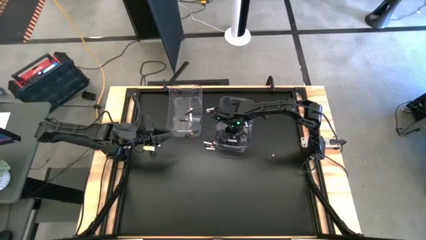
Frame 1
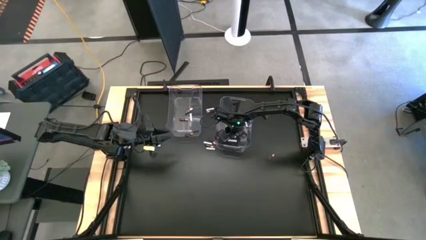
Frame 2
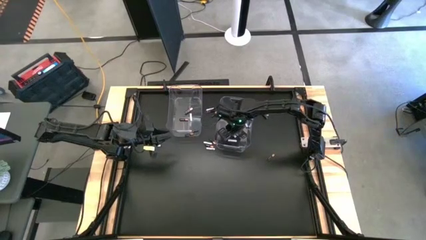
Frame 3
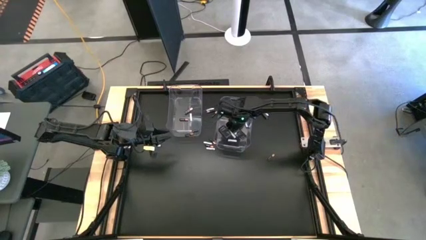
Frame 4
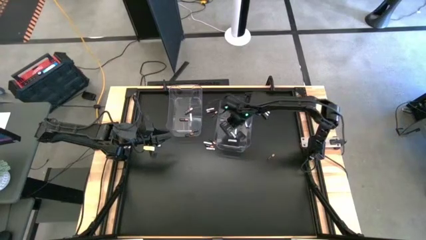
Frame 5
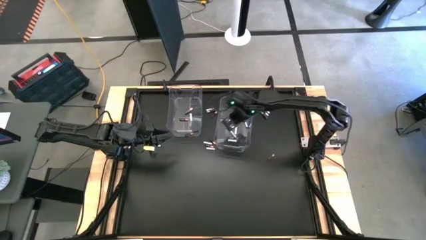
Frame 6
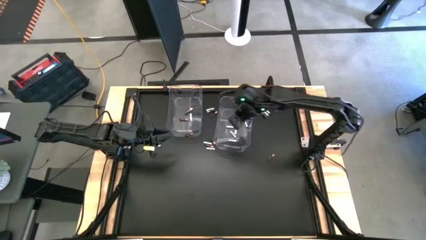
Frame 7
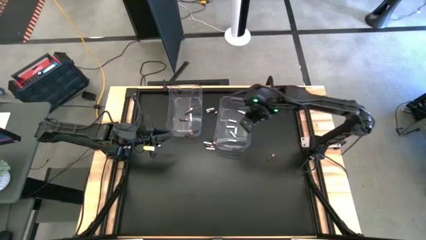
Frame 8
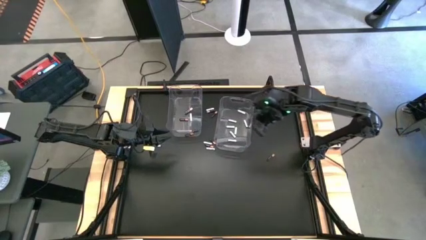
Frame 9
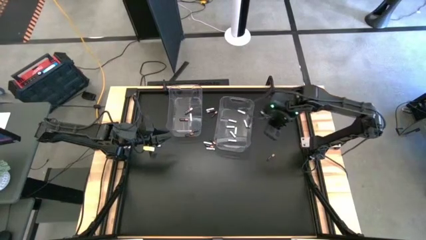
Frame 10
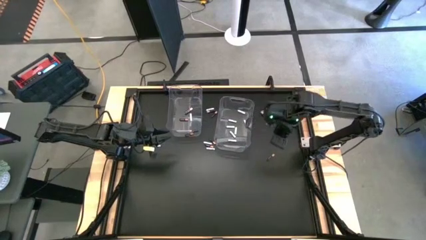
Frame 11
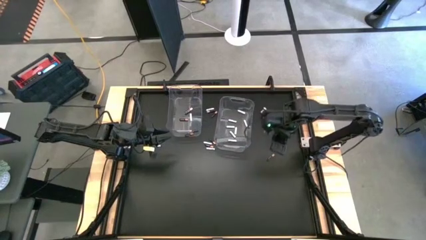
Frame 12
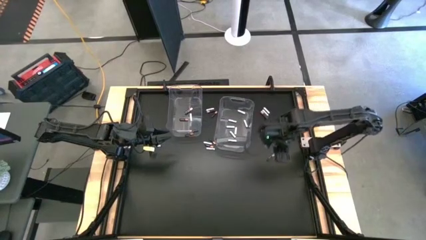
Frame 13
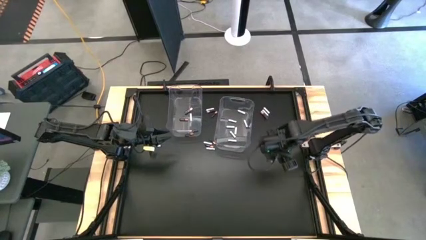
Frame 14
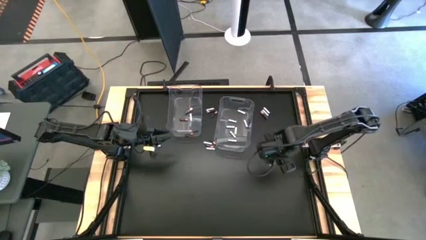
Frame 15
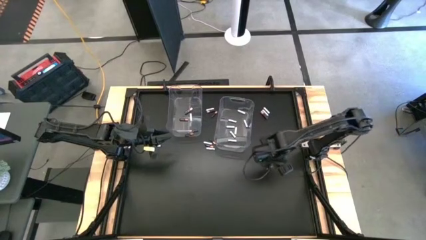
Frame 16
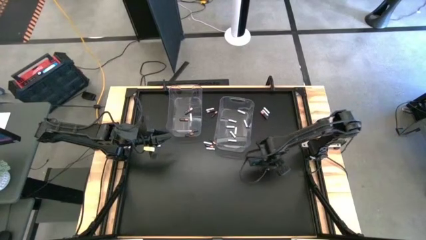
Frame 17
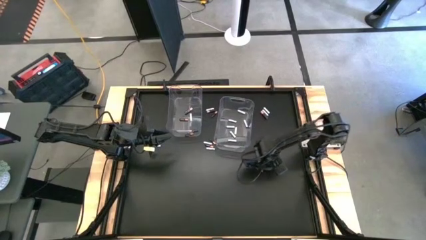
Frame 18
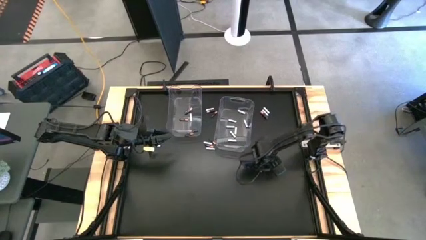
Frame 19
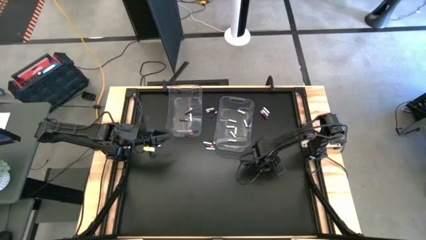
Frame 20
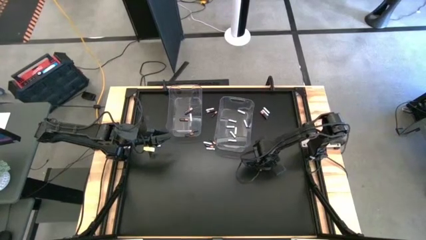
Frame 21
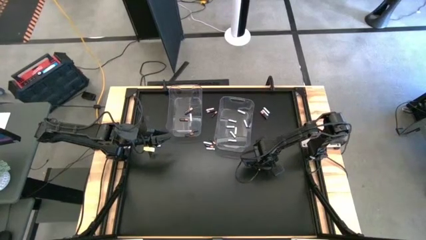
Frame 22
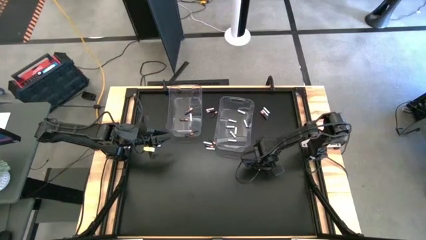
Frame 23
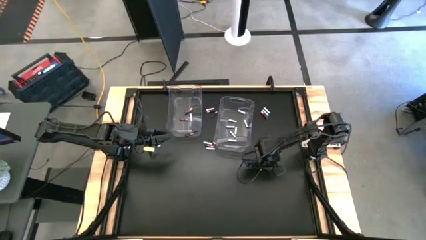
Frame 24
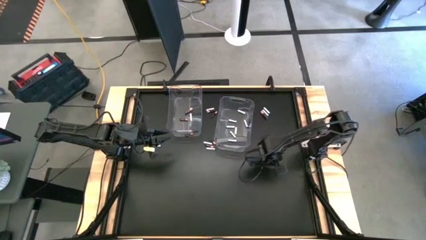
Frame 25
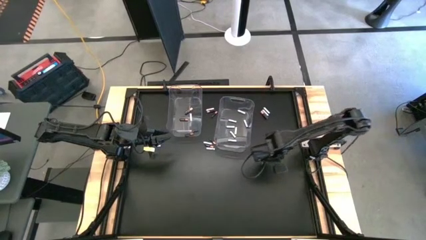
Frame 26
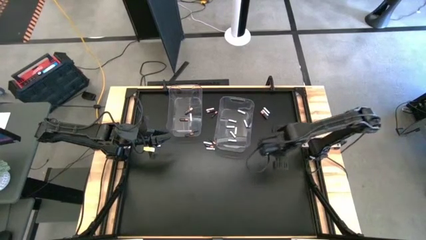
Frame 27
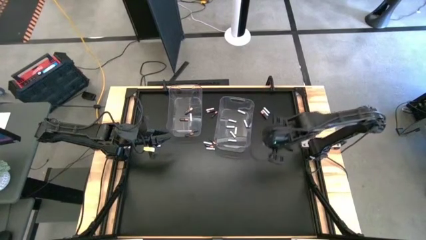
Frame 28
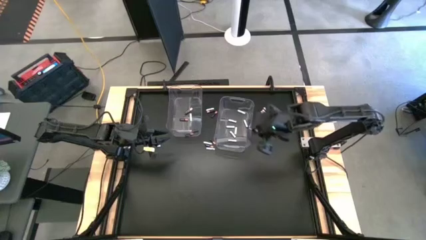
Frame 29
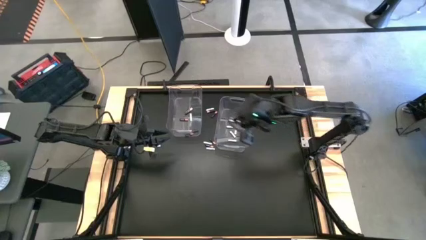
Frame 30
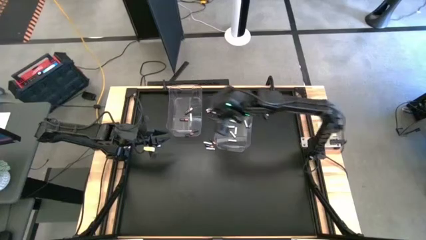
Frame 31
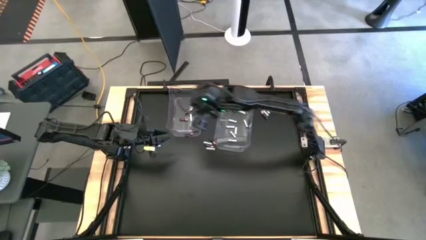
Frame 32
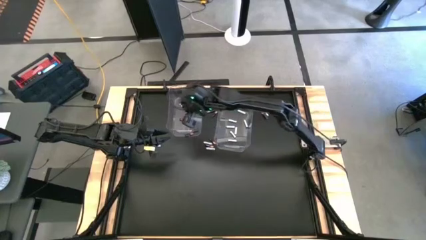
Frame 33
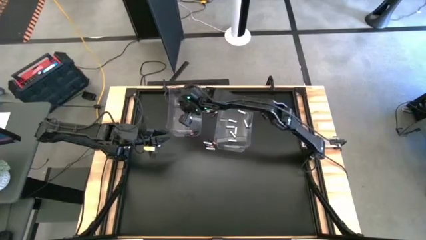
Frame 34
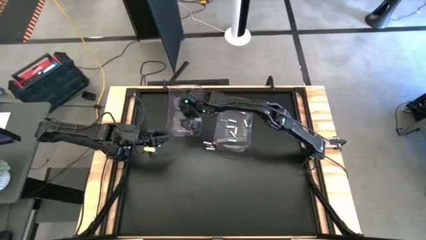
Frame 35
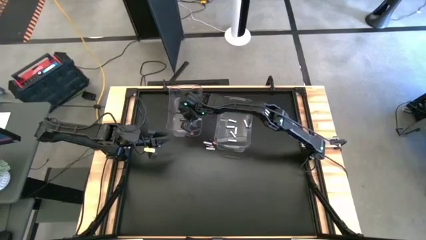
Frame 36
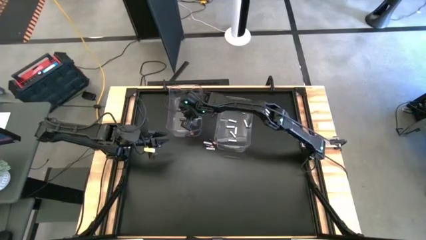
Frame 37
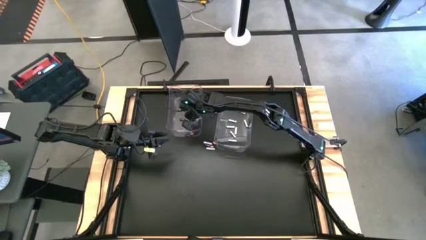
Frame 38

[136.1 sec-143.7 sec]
Task: Sort batteries
Put the black battery into the left transparent bin

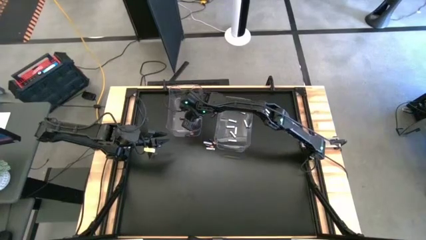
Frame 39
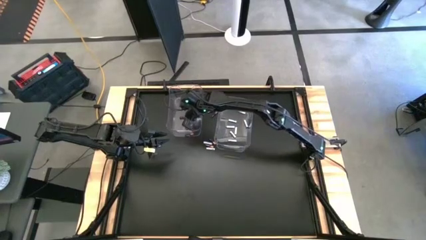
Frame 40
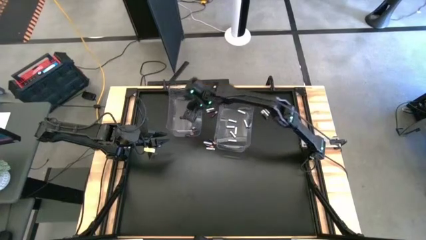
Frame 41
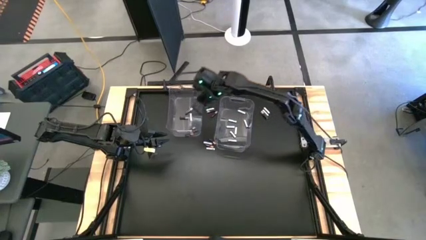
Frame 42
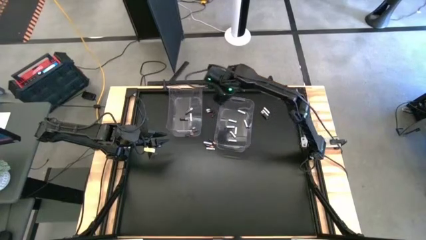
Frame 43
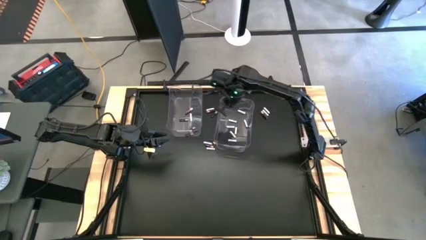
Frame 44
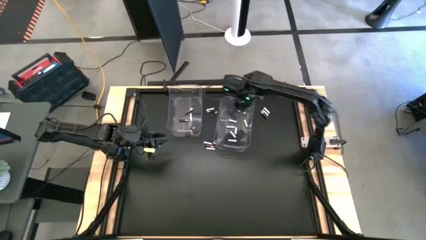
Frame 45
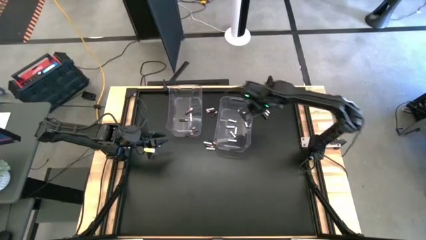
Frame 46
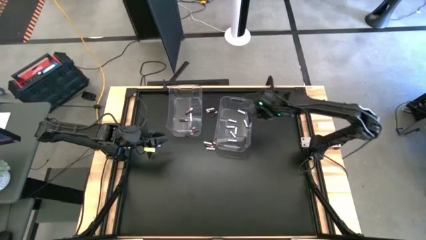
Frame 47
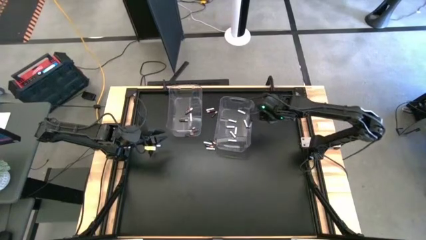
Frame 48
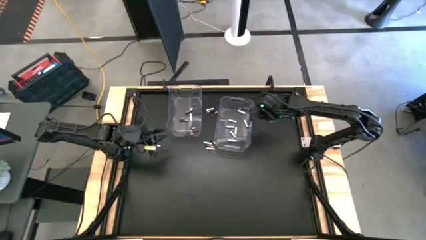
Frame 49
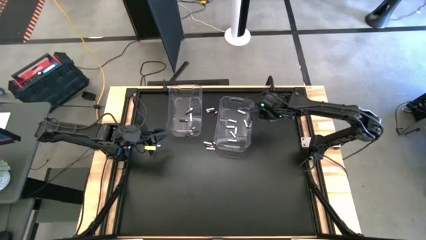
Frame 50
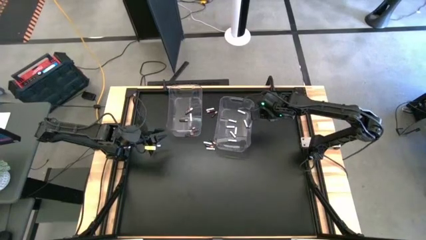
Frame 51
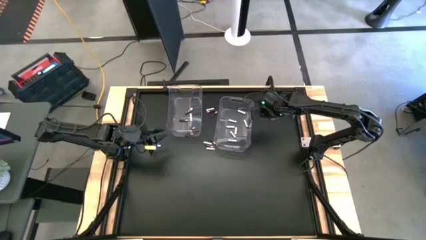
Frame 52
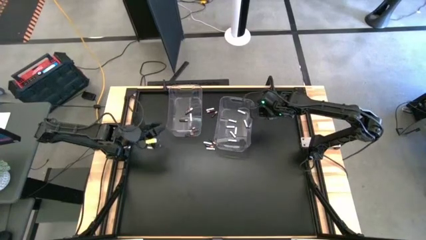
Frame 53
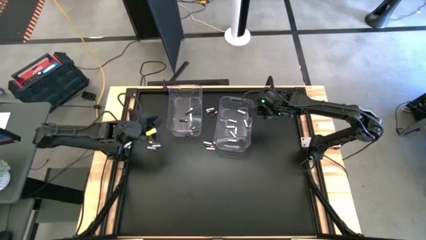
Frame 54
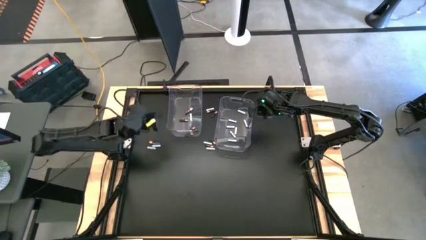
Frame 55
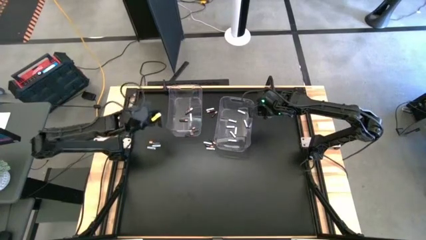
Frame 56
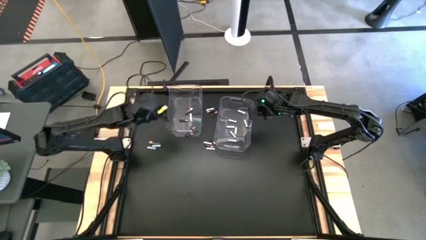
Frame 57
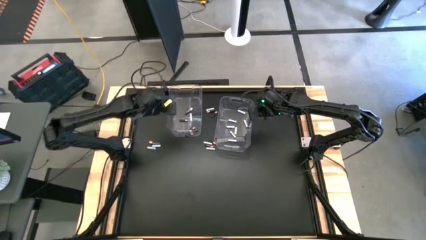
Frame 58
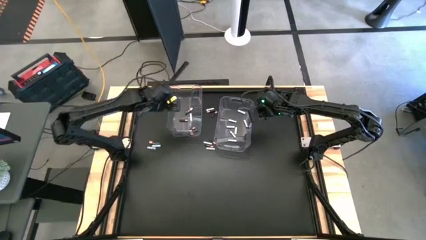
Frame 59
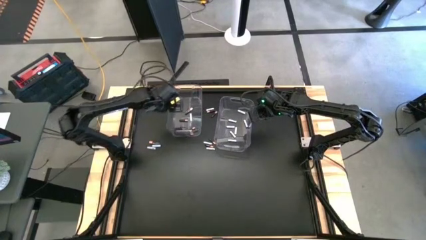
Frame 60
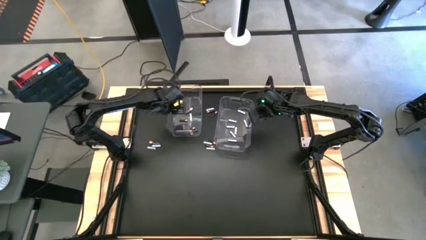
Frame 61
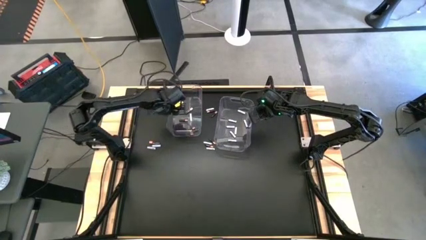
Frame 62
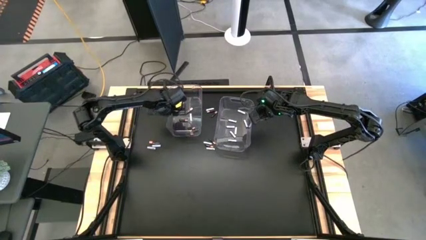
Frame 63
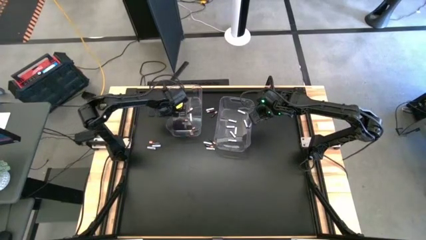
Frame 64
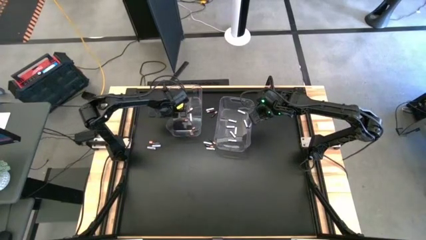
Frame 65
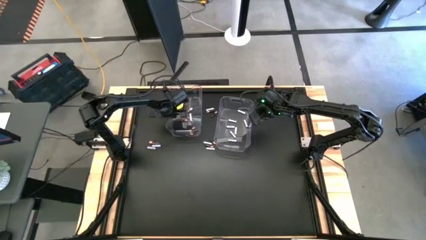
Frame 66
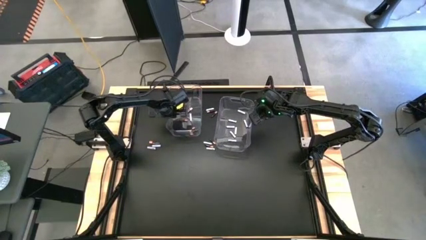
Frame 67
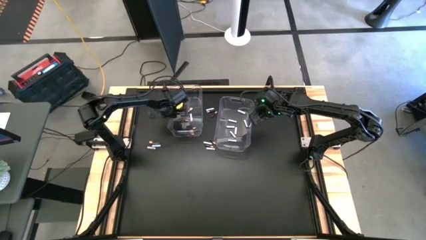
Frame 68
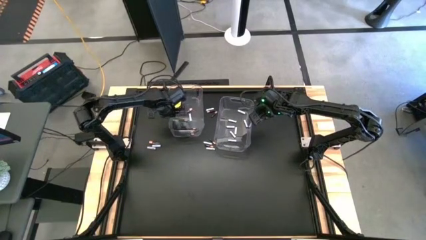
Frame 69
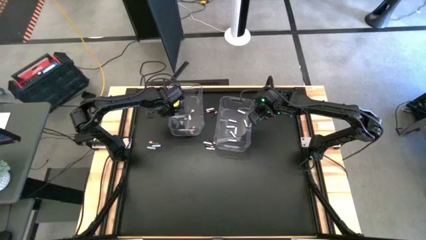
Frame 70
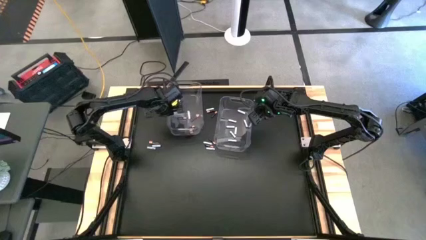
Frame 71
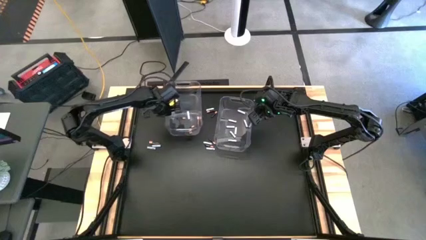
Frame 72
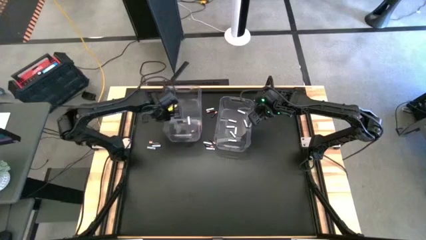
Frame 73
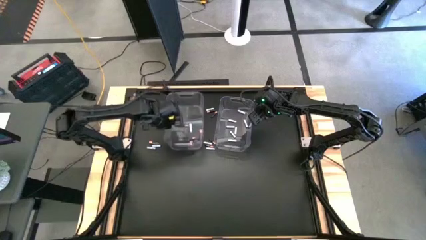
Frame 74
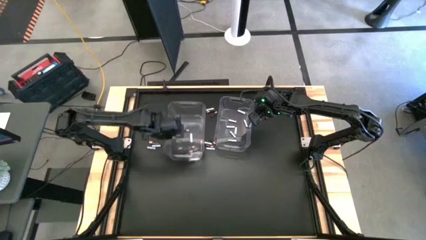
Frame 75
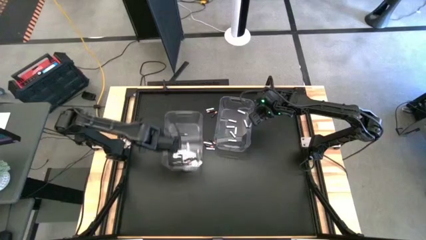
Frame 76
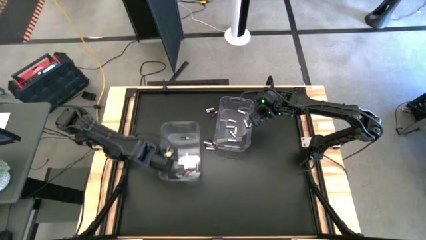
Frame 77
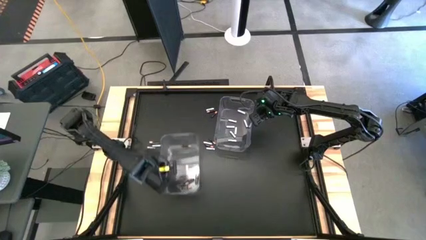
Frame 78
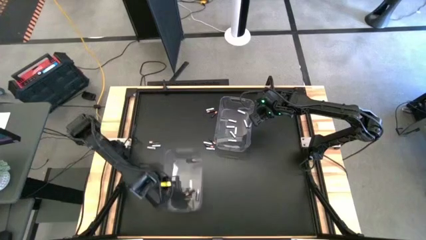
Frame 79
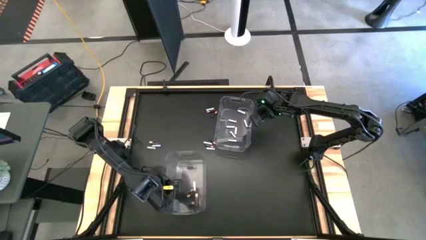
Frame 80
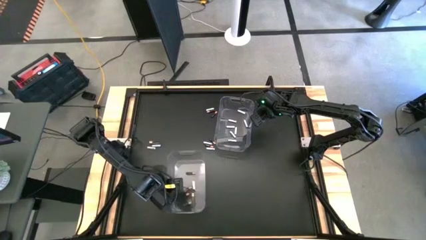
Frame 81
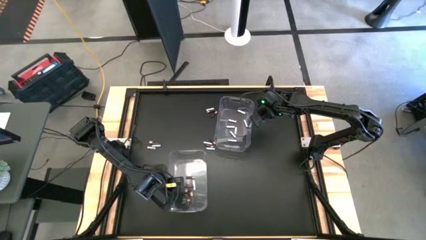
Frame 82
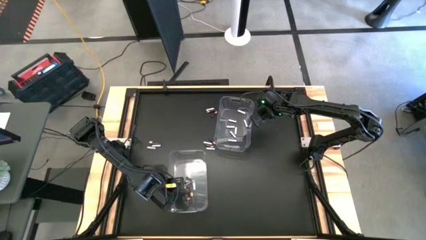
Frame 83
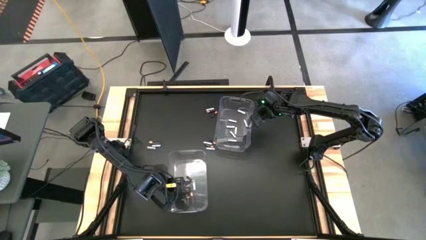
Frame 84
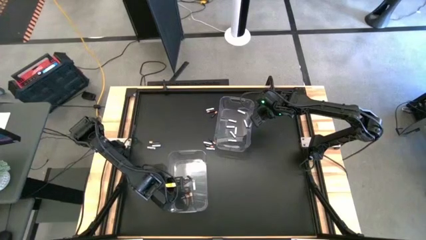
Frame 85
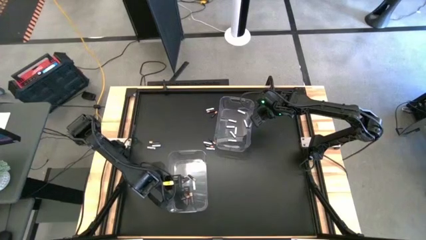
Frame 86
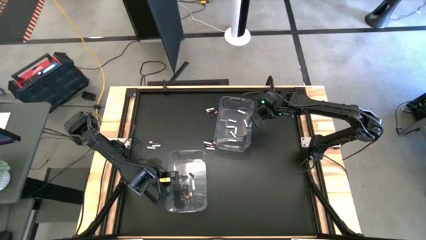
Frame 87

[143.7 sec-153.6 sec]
Move the left transparent bin to the bottom of the table
